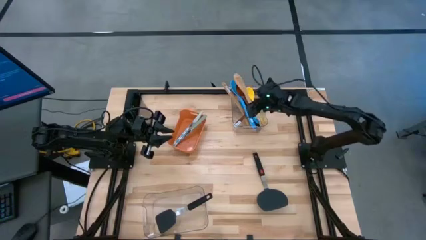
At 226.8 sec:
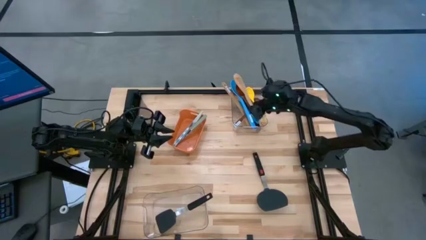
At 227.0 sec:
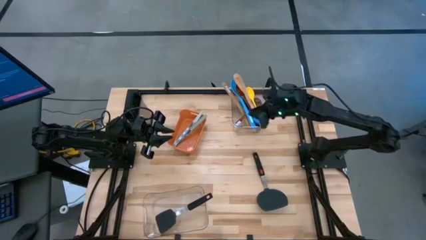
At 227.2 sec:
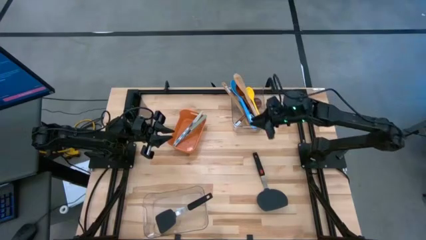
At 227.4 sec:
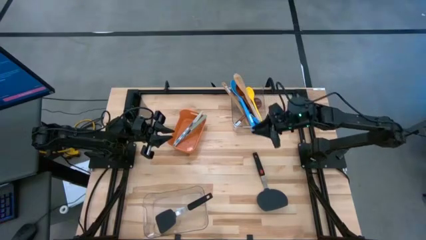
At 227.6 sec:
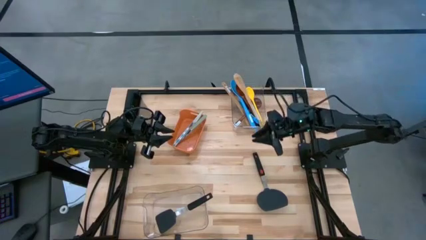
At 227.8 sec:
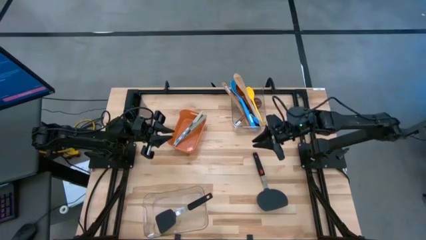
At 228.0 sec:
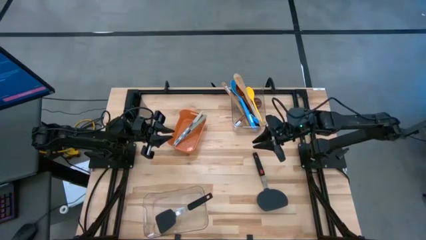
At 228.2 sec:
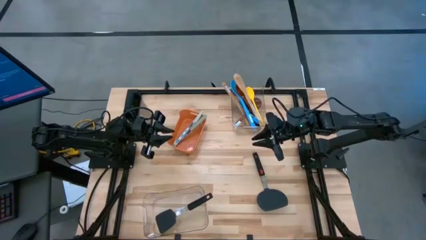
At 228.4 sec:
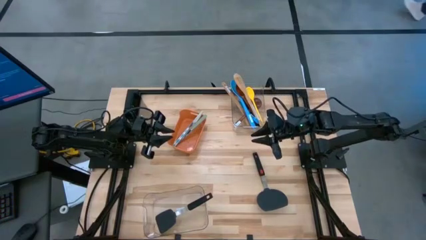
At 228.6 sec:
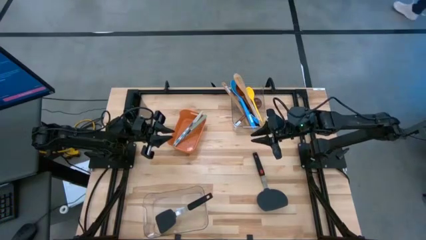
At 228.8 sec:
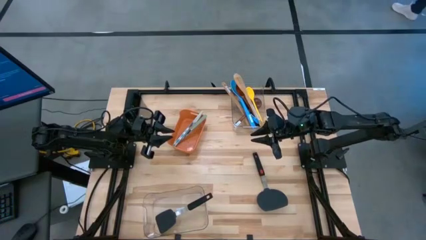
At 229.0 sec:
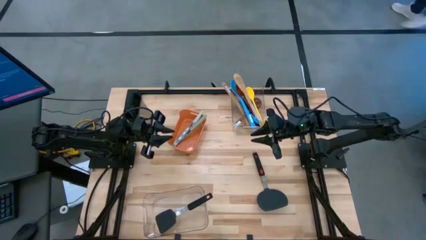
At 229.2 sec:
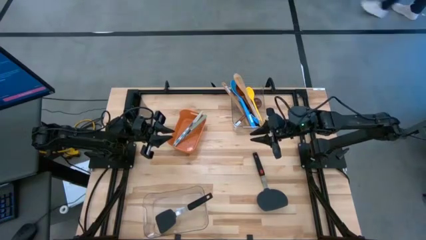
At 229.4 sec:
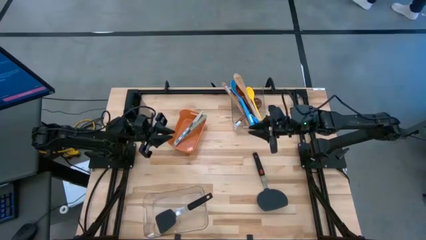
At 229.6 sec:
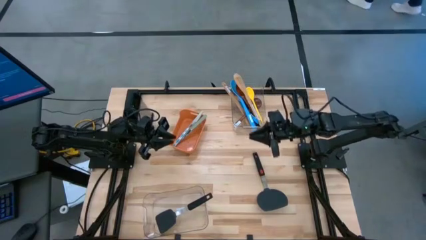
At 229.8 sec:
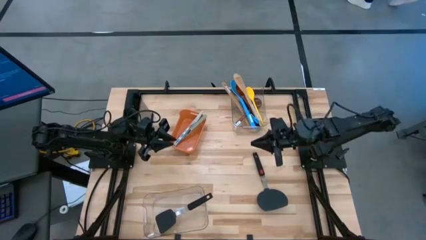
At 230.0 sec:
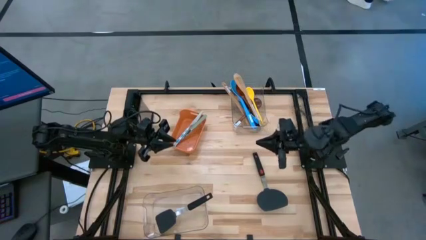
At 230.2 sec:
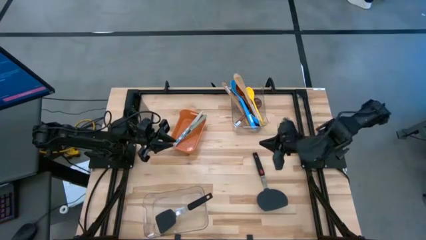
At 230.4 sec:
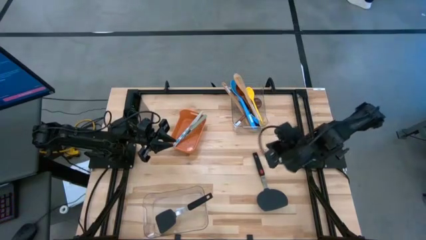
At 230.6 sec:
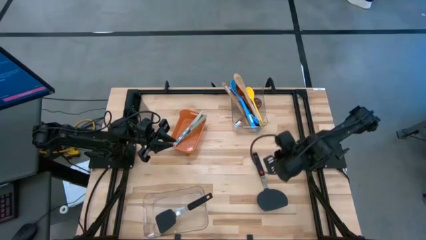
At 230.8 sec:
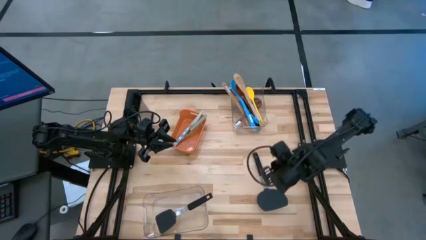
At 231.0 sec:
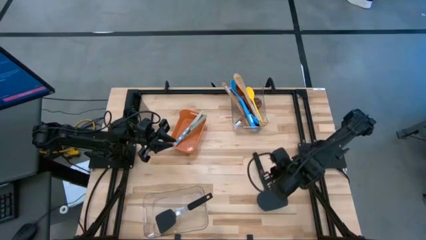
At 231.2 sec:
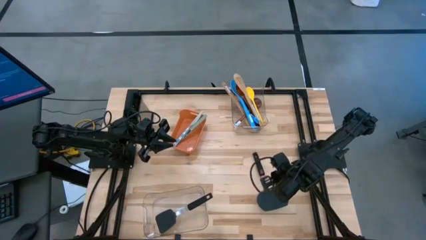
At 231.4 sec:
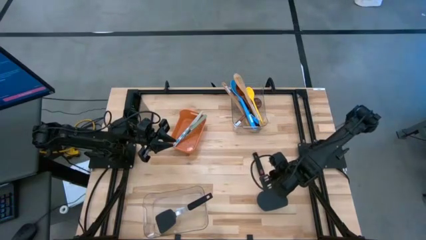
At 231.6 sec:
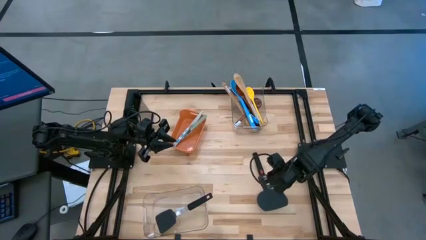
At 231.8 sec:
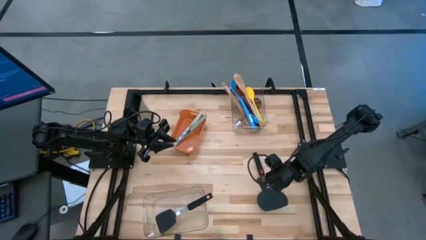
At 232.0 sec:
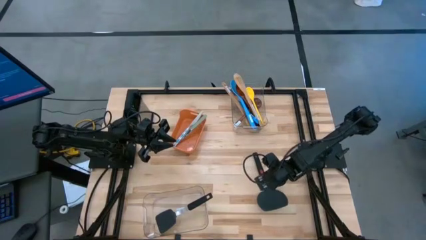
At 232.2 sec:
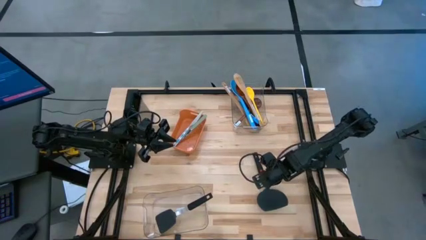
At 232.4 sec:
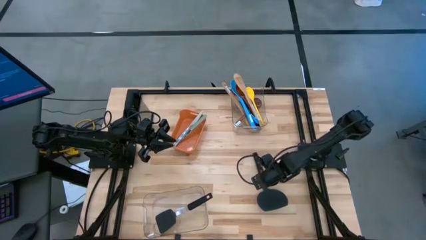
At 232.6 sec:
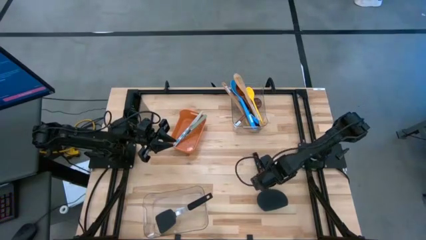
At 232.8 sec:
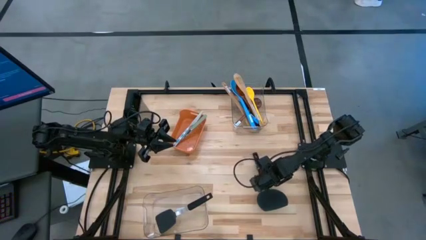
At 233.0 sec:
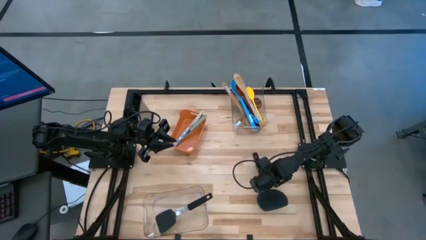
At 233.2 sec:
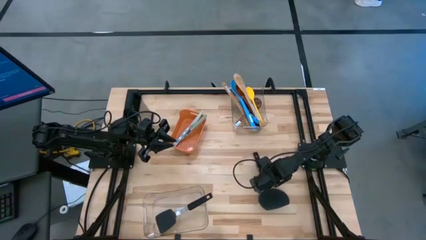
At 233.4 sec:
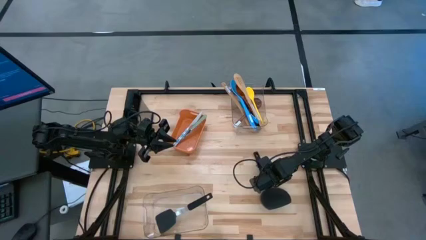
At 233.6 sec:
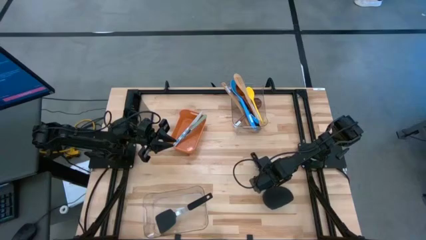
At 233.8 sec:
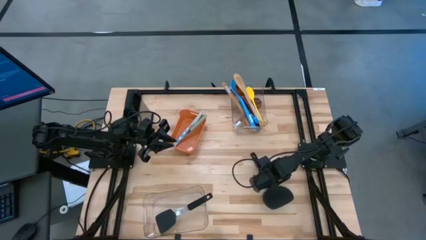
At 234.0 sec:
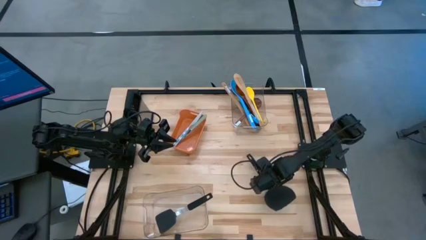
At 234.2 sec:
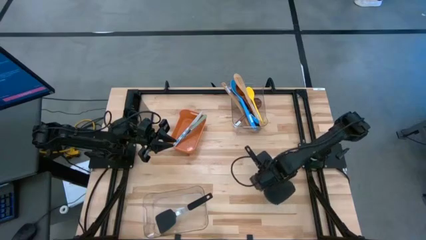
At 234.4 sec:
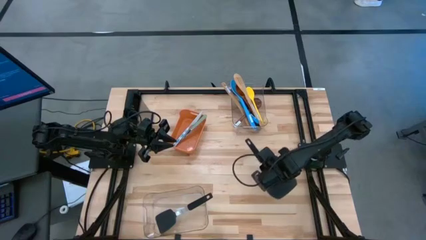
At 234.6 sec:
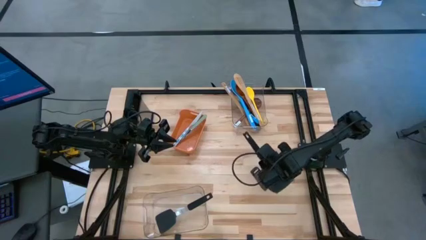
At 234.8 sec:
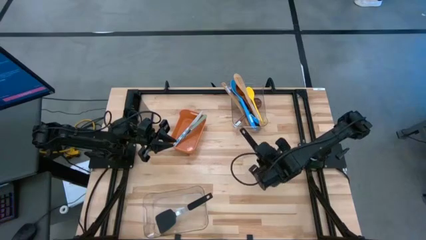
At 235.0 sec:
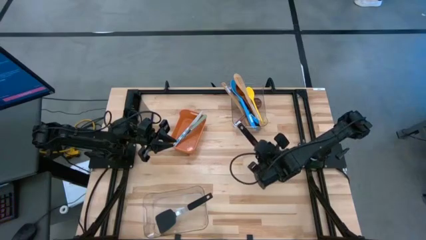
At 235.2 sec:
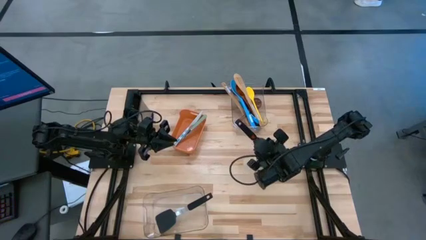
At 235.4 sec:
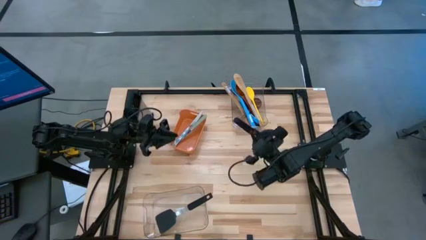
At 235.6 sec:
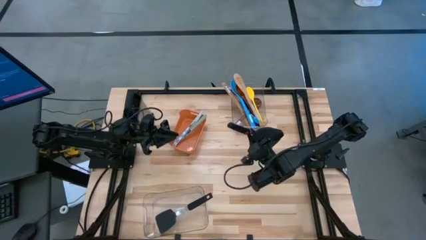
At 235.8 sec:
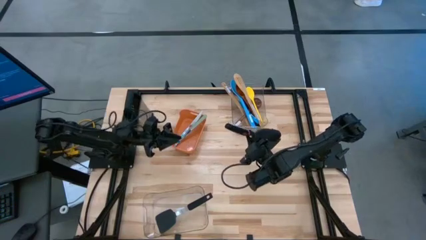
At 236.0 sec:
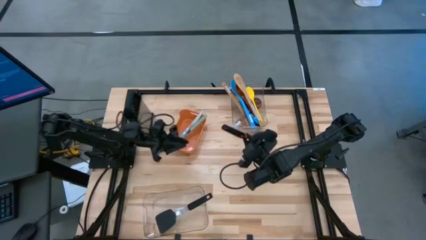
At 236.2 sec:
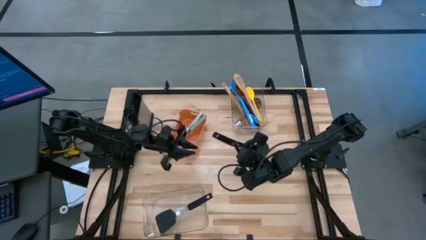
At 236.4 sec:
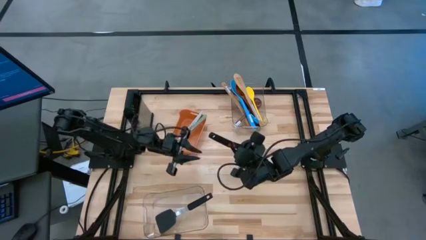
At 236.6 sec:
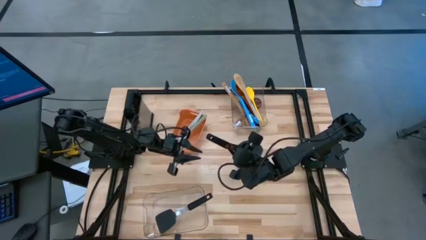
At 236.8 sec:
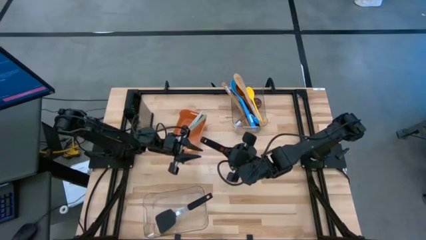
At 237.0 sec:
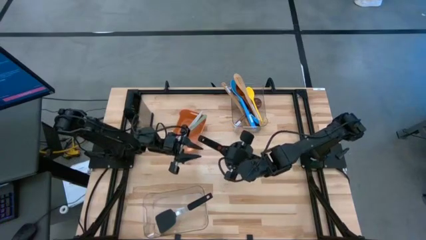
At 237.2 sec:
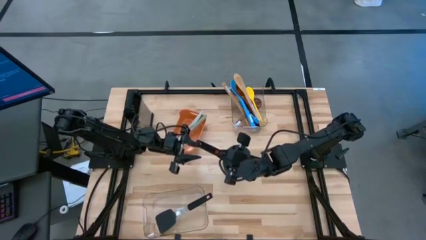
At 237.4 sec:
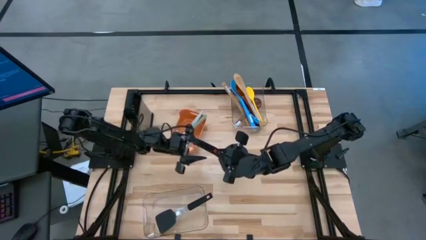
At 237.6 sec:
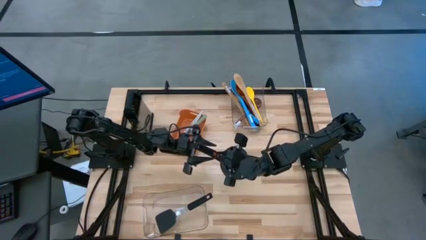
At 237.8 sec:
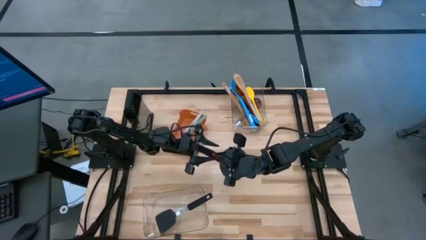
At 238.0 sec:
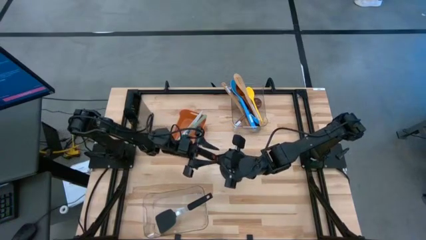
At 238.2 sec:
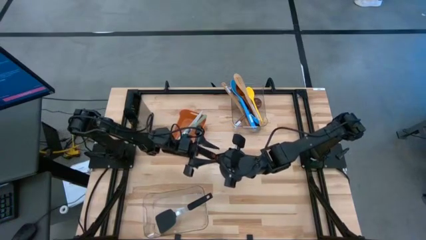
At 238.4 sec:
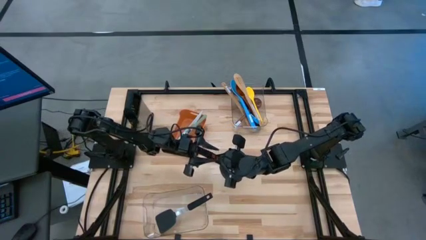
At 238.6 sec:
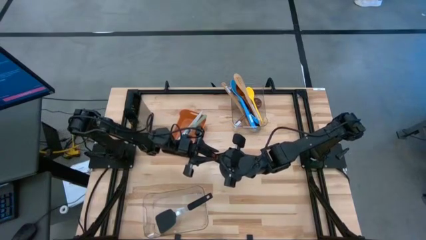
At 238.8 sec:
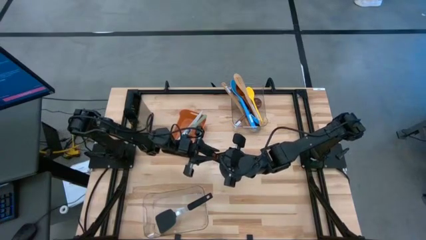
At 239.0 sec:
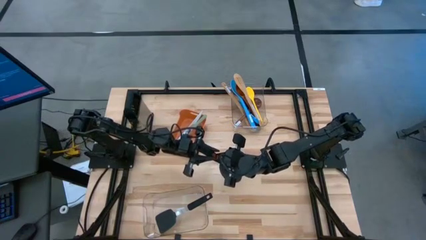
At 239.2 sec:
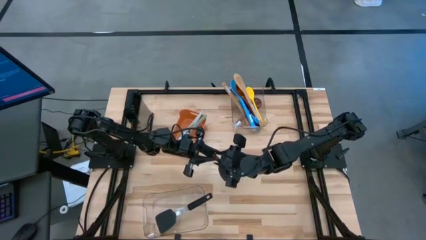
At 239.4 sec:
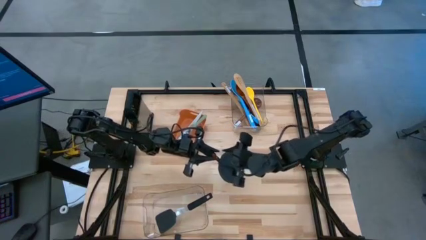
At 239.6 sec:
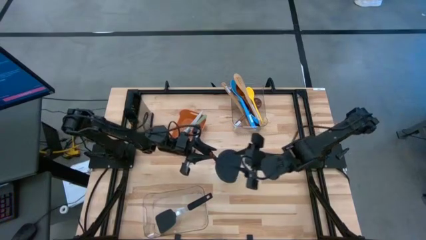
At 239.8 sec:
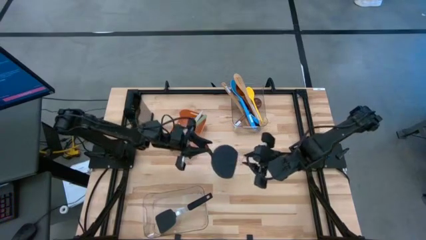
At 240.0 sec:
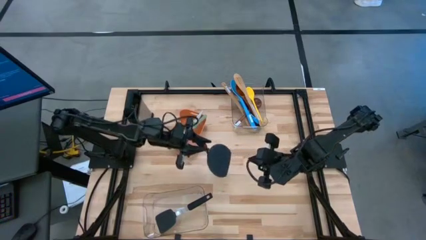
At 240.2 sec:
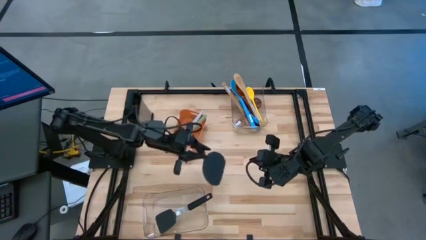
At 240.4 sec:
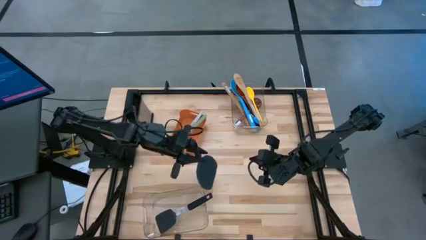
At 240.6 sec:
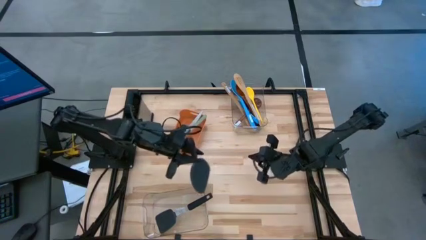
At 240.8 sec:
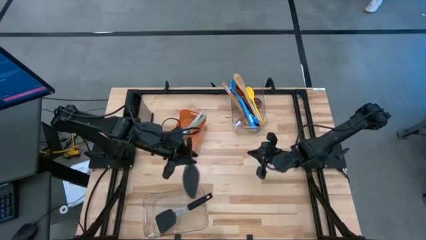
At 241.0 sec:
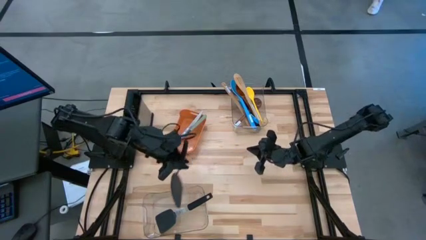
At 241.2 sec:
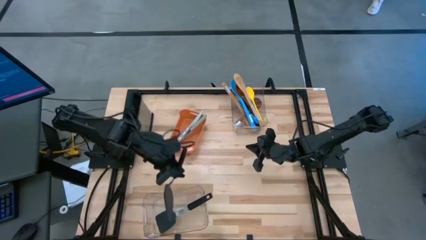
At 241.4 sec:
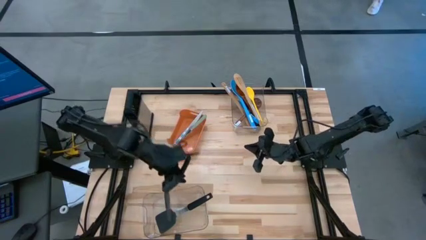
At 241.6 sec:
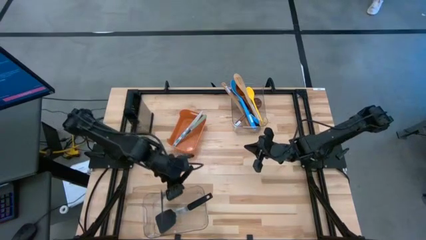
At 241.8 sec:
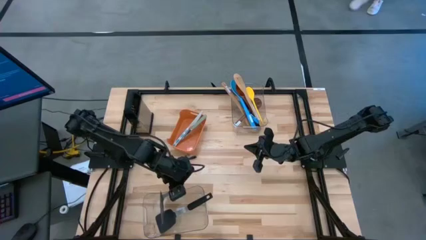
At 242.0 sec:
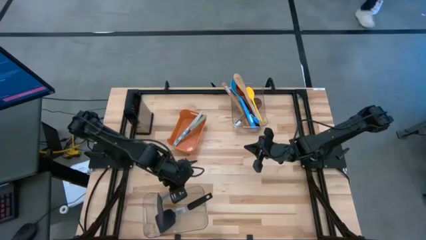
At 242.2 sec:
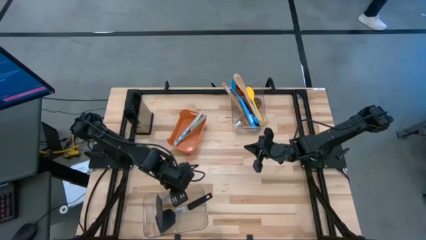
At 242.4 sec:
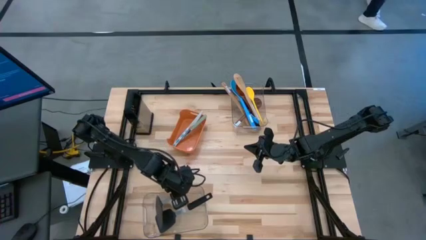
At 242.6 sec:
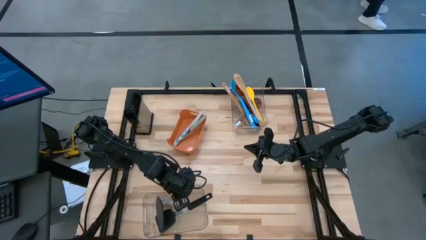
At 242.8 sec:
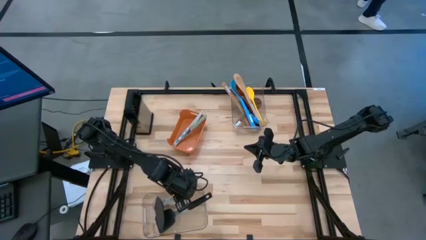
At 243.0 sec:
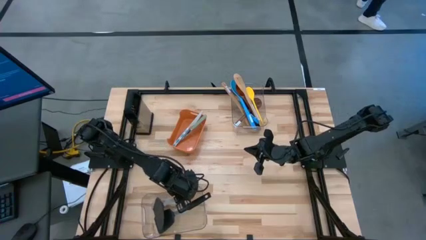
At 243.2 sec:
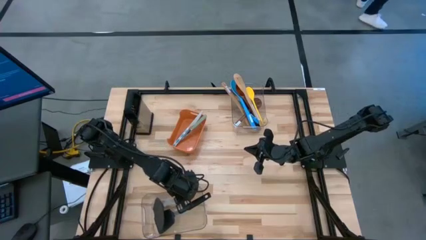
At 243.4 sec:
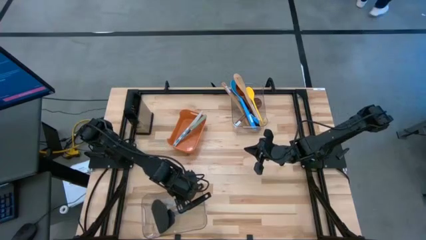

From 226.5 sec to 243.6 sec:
Task: Pick & Place Kitchen Items
Put the black flipper spatula into the bottom transparent bin
